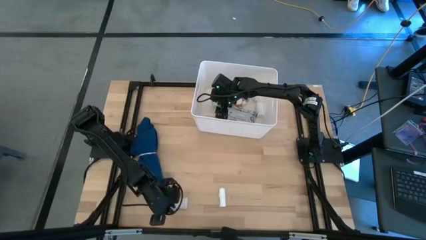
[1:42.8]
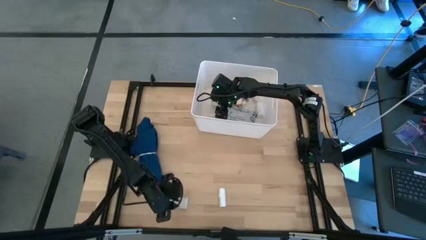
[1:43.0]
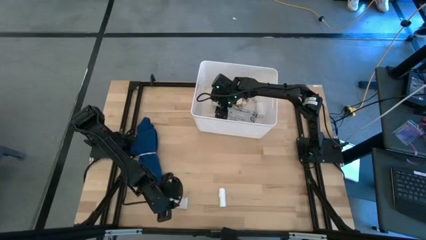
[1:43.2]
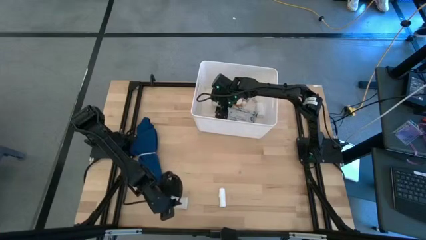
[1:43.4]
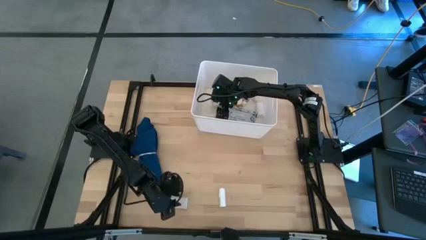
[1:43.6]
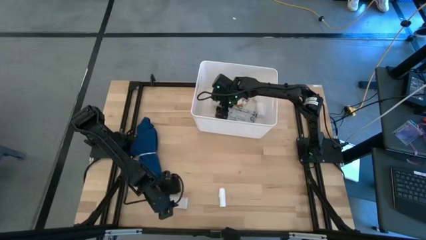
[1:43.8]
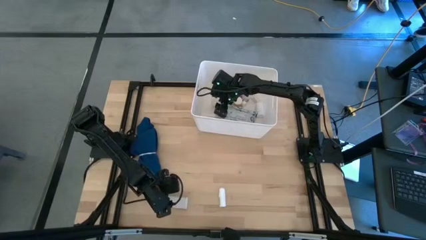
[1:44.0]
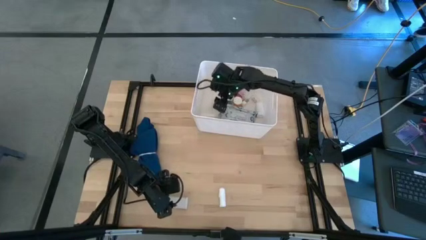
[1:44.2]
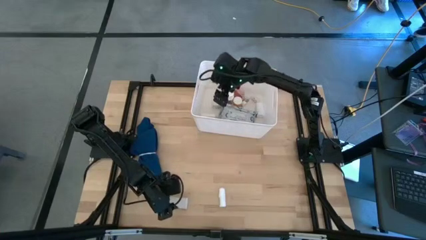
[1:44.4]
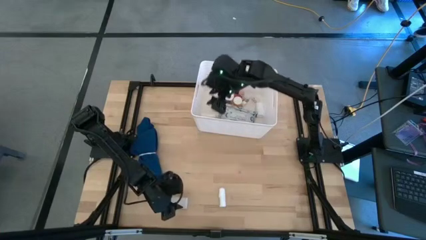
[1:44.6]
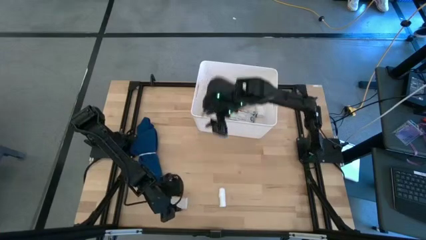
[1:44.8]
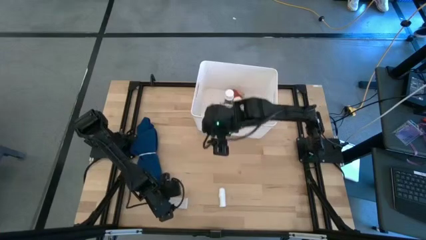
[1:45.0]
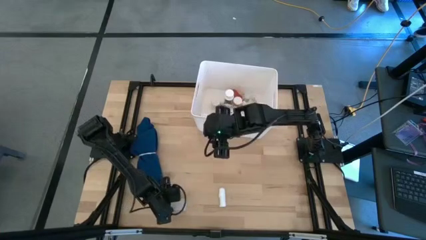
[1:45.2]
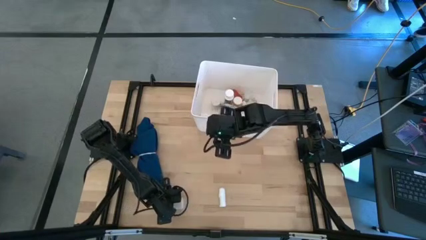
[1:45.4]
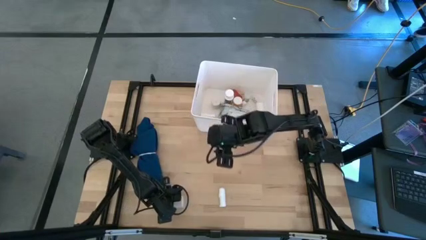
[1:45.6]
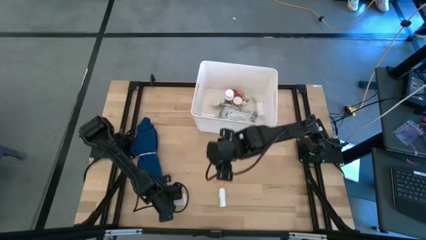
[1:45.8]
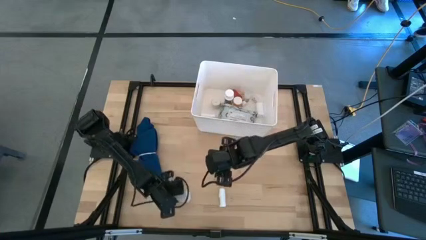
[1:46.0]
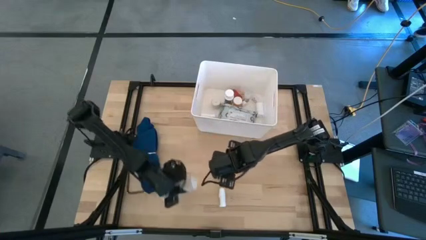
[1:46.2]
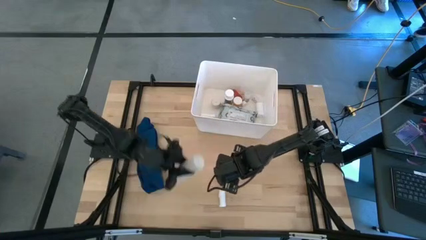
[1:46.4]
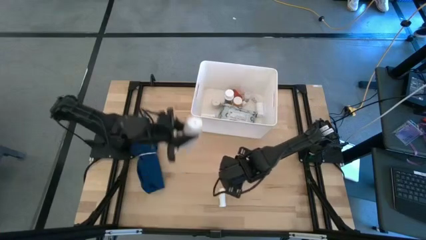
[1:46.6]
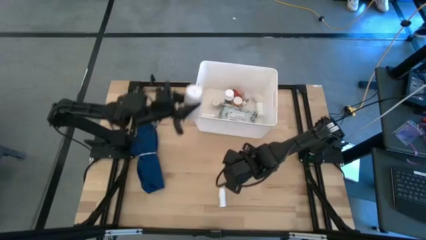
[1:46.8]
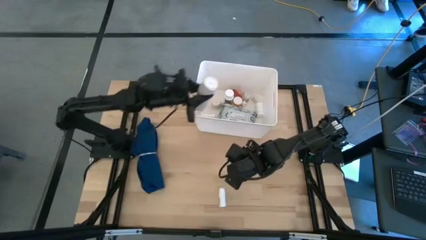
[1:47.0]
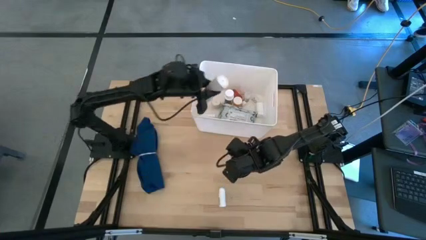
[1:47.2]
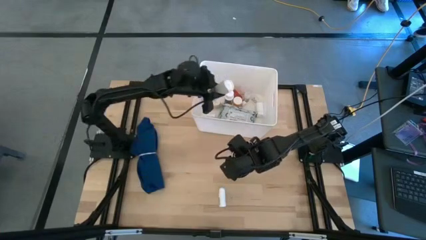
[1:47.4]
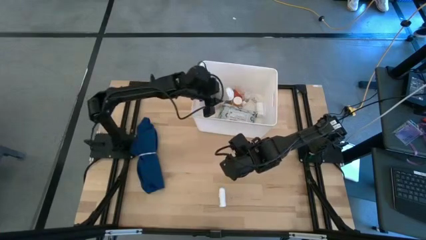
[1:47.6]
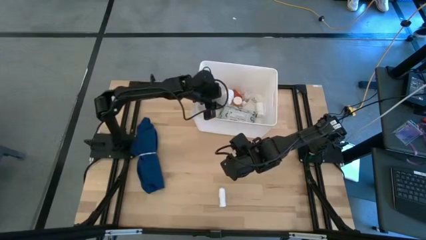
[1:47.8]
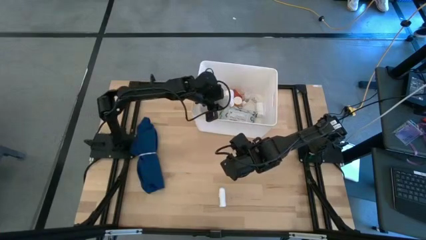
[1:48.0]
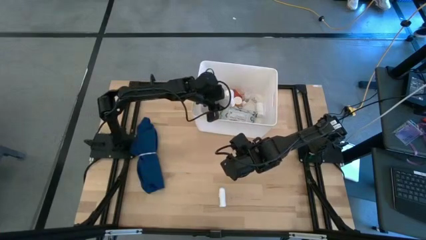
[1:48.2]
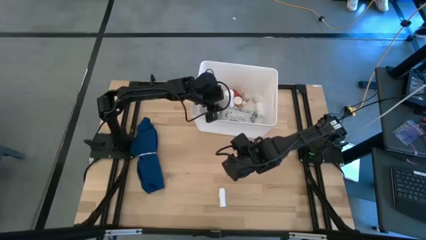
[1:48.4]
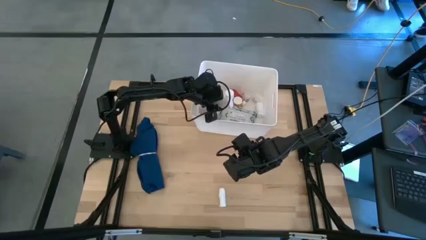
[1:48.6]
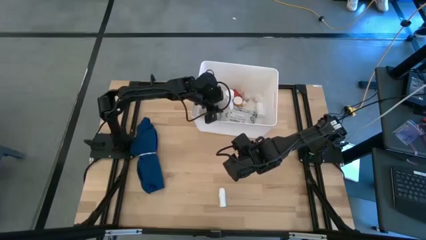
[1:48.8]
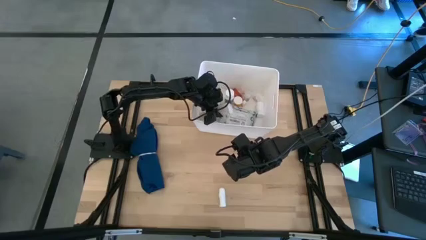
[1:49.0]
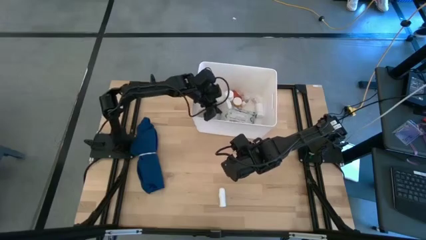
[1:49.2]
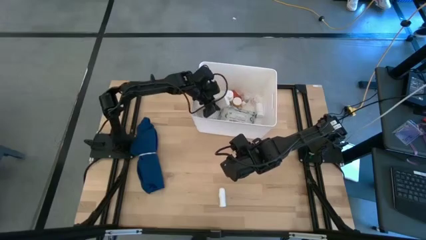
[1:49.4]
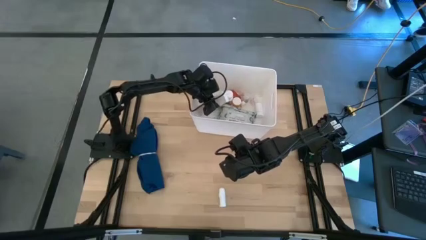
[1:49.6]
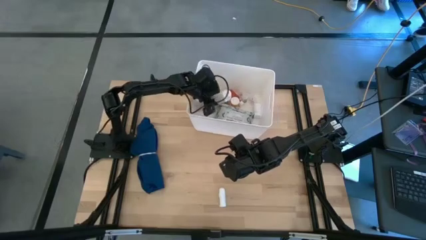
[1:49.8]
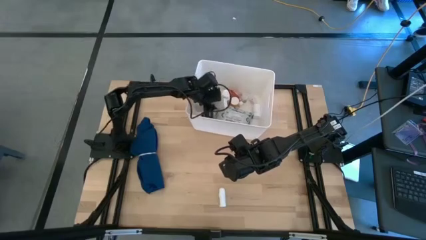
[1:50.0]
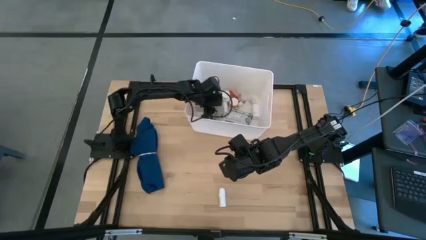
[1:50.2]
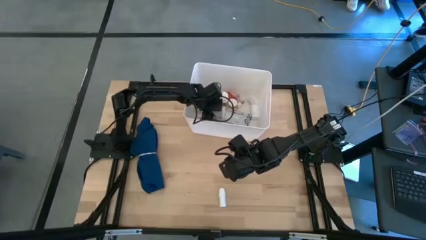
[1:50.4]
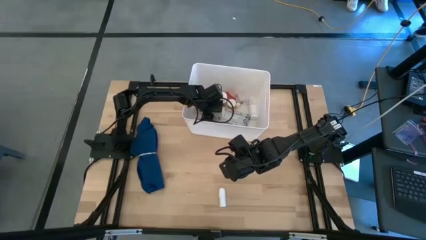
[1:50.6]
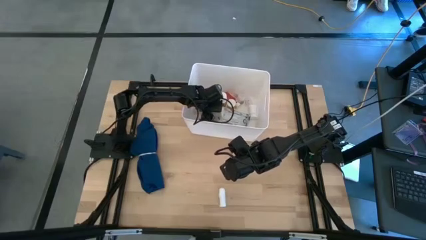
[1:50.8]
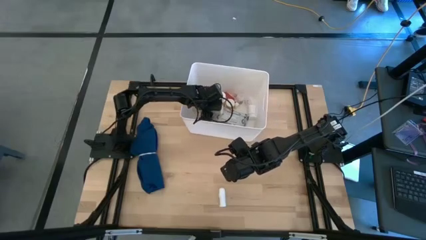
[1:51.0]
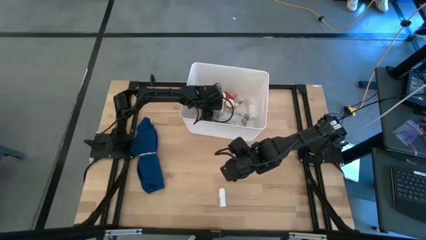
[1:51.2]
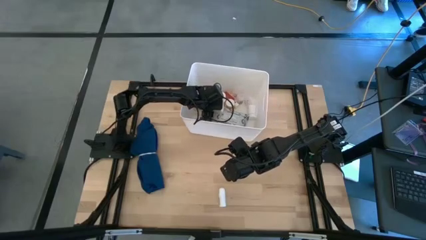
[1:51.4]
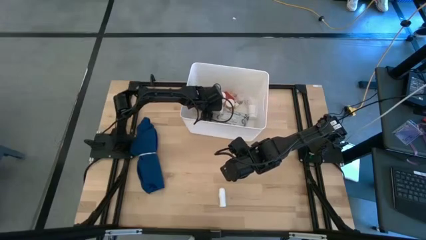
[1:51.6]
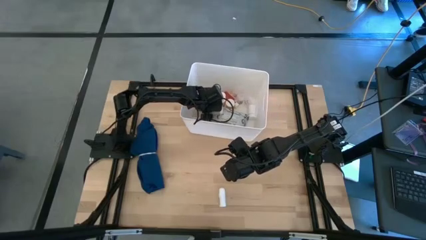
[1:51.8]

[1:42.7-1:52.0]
Task: Pick & place medical supplies in basket/bin
Put the bandage in the white bin

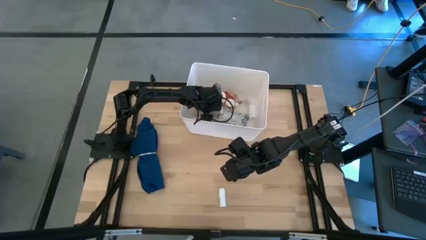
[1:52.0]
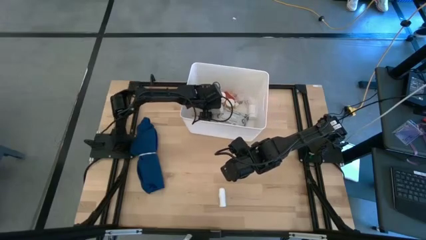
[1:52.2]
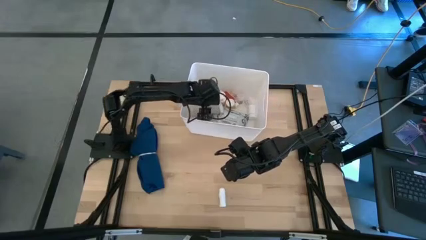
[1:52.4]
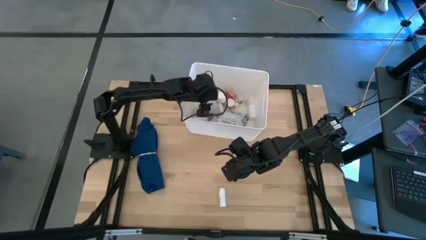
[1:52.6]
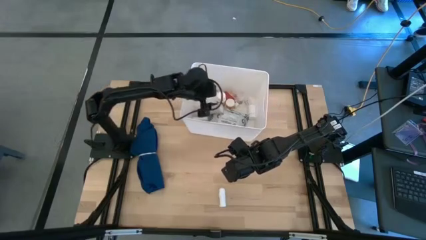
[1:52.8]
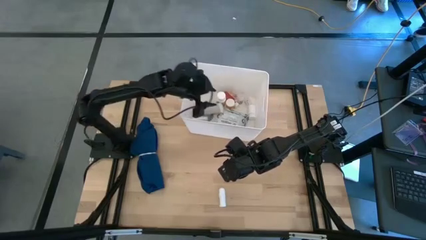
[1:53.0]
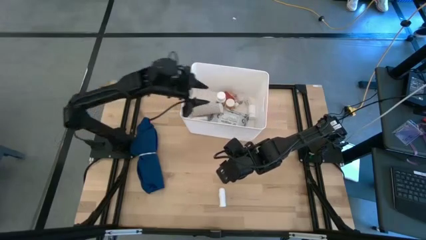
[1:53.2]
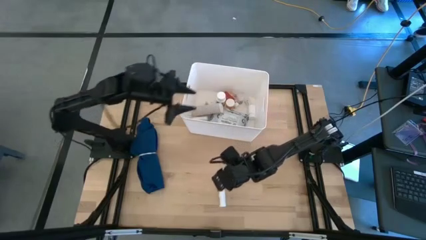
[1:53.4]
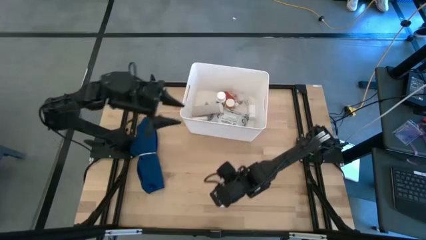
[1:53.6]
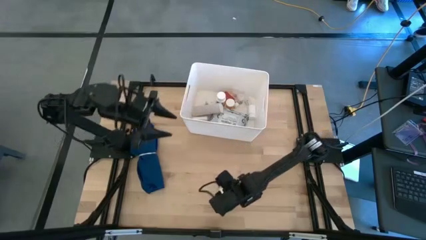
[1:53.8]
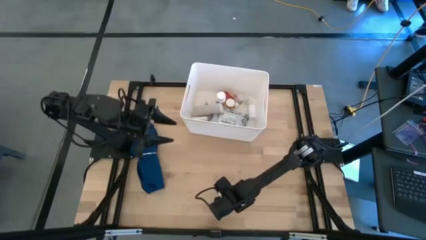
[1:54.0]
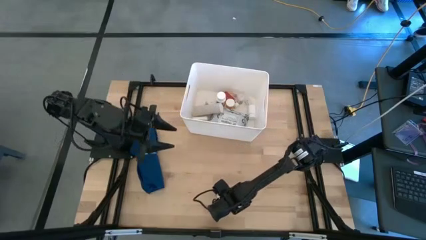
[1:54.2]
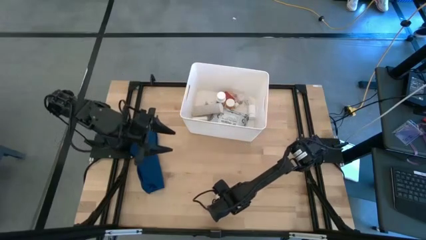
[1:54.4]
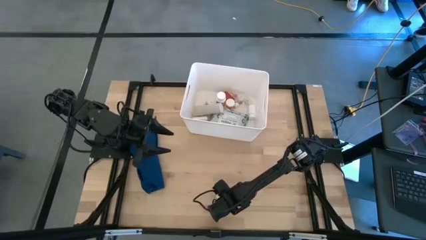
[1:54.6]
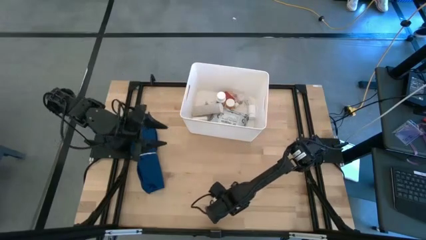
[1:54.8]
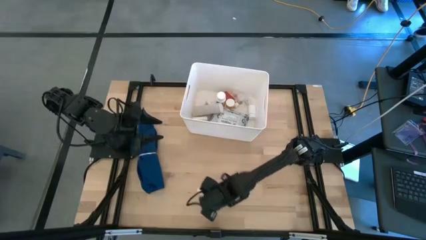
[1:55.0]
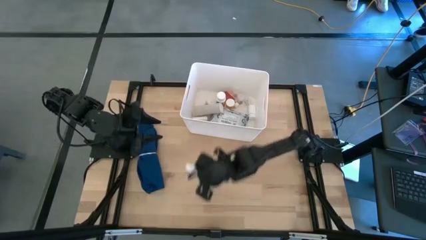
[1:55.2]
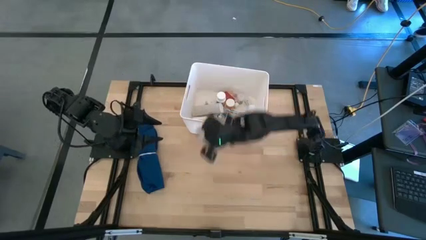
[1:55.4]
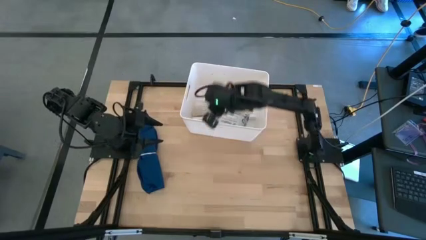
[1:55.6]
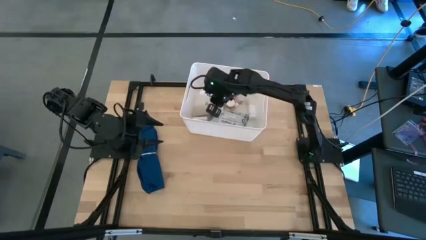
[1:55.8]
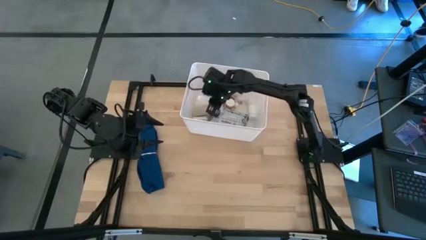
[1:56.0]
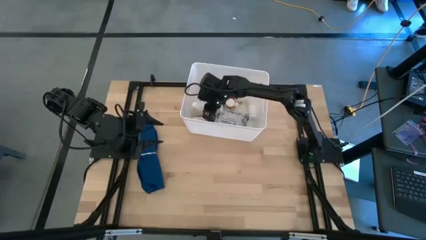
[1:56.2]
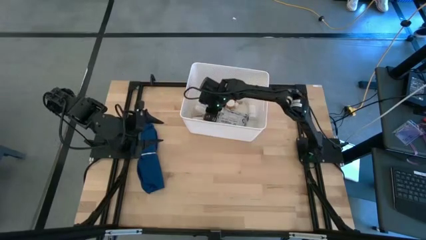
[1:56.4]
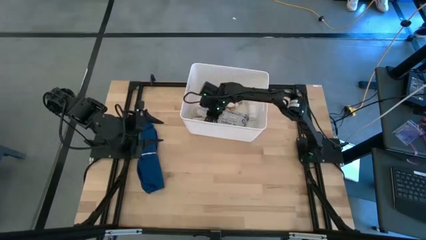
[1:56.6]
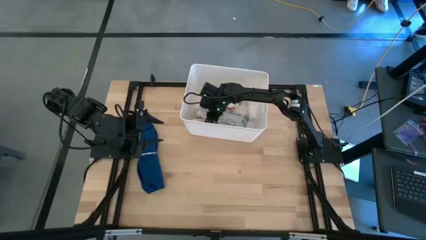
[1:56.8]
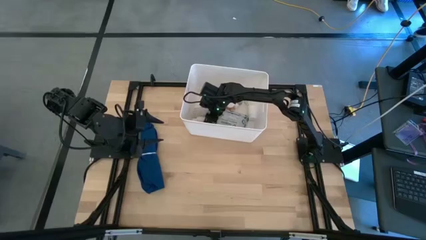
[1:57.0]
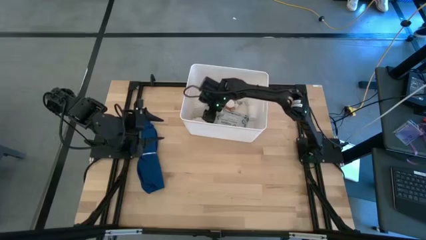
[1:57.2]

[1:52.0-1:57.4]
Put the rolled gauze in the white bin

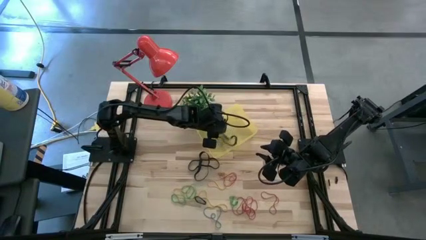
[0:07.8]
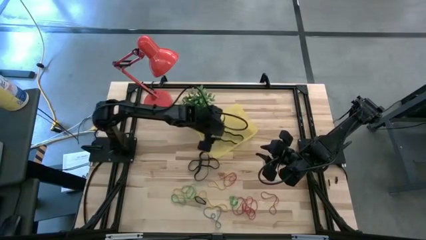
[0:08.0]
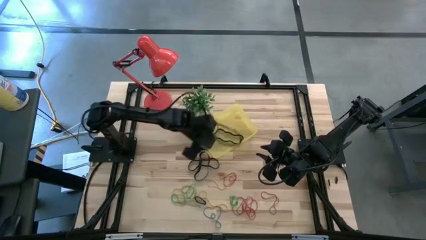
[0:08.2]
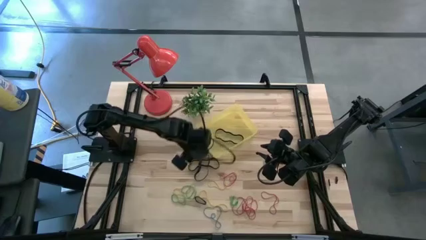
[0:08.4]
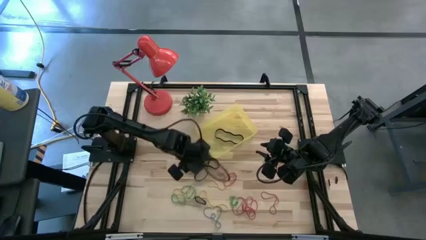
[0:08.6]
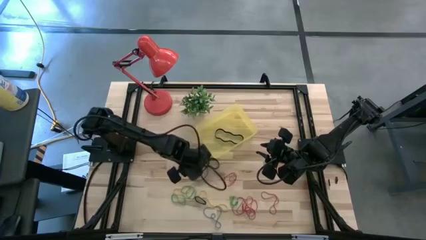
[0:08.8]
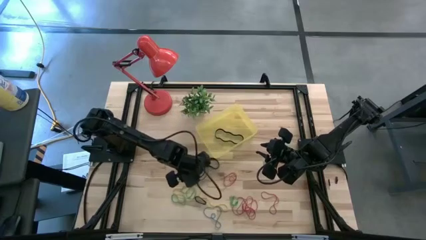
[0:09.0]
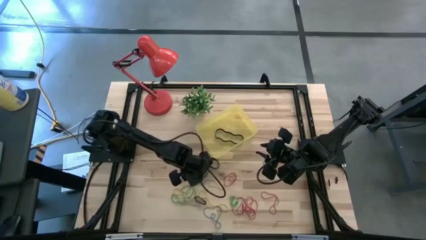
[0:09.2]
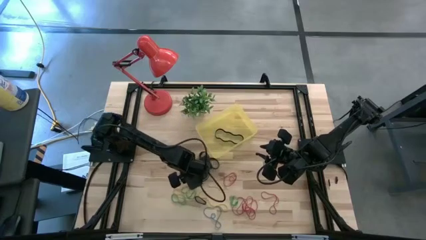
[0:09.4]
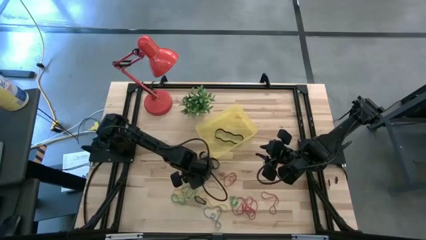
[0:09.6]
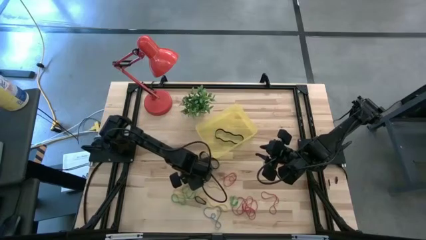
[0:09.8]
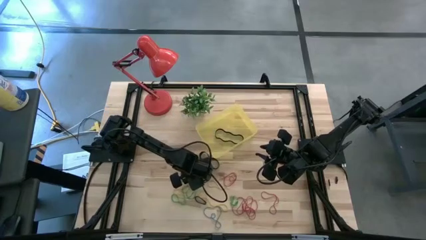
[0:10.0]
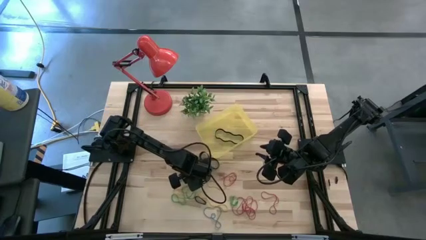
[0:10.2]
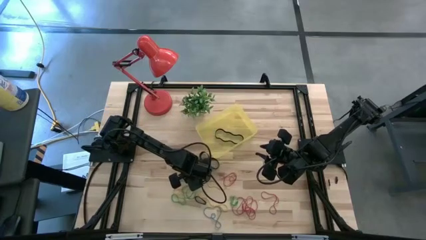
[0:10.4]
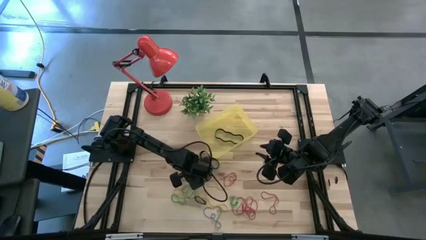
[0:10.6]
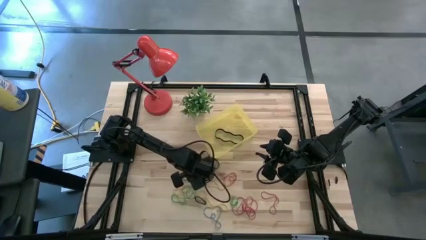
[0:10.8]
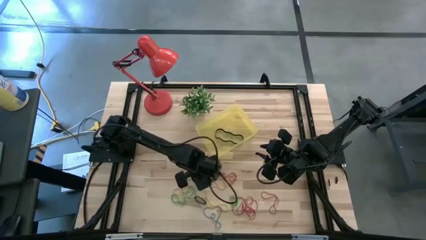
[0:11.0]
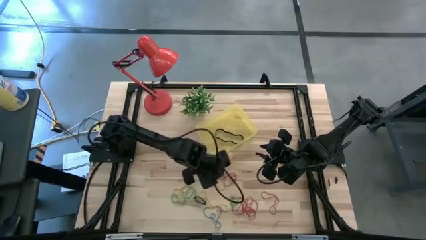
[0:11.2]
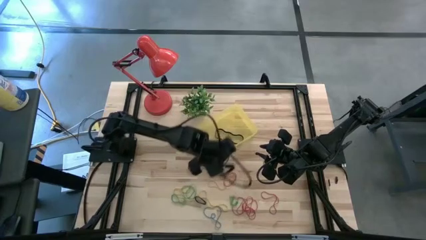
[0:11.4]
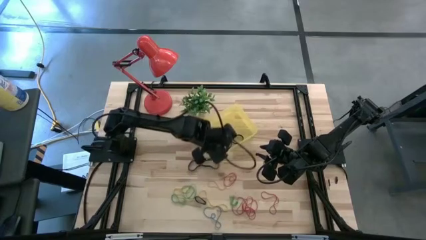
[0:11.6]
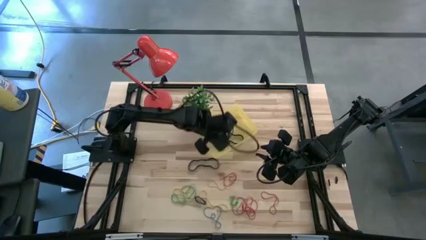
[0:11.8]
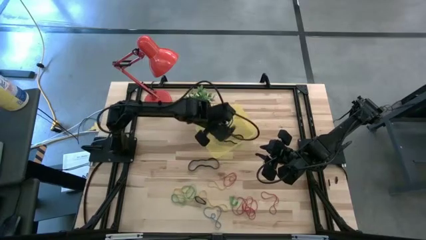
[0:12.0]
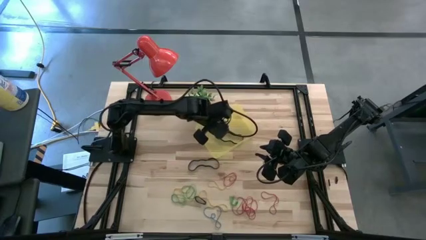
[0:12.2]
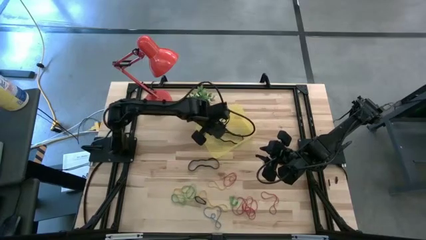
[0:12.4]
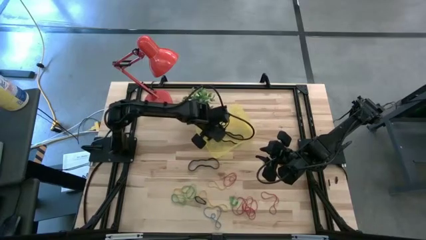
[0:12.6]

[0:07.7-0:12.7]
Task: Pick and place rubber bands into bin
Put the black rubber band into the transparent yellow bin
